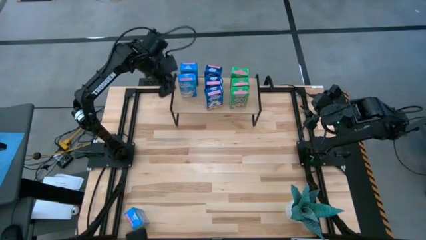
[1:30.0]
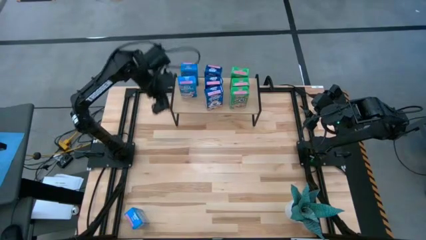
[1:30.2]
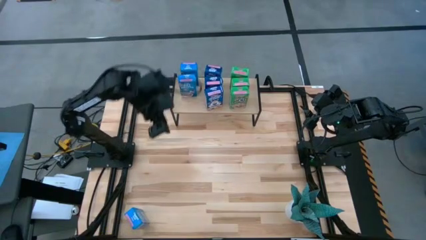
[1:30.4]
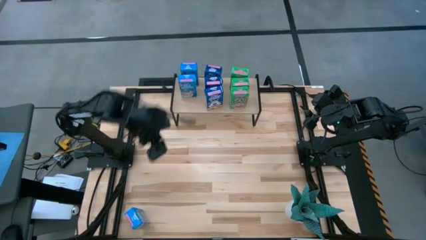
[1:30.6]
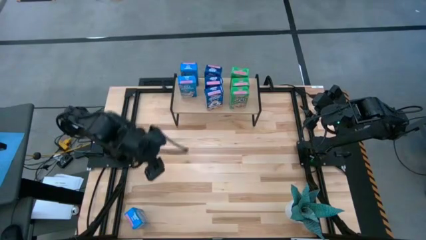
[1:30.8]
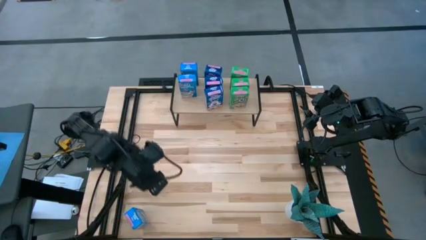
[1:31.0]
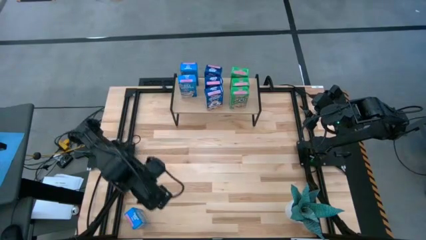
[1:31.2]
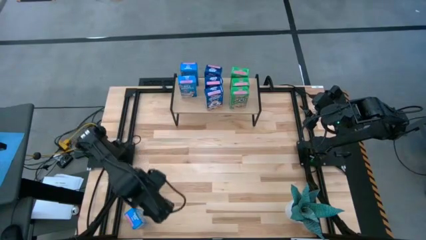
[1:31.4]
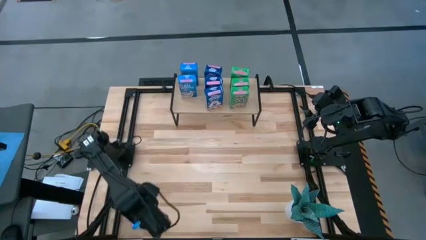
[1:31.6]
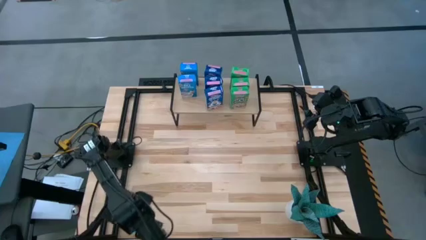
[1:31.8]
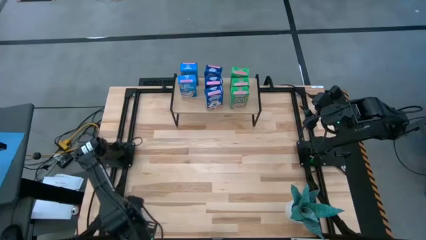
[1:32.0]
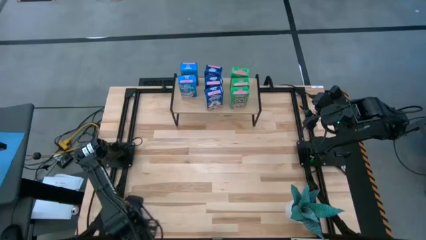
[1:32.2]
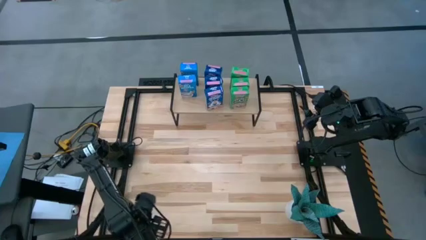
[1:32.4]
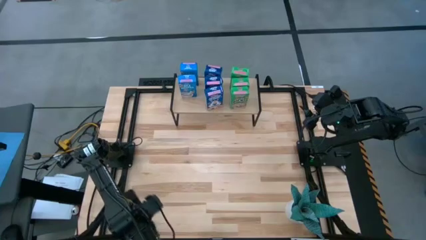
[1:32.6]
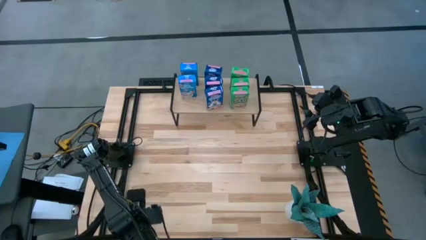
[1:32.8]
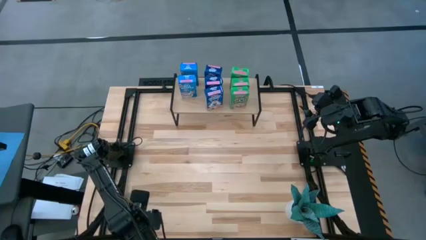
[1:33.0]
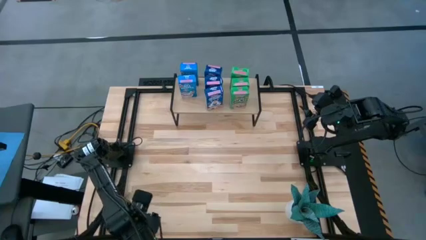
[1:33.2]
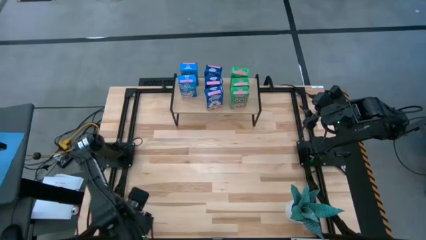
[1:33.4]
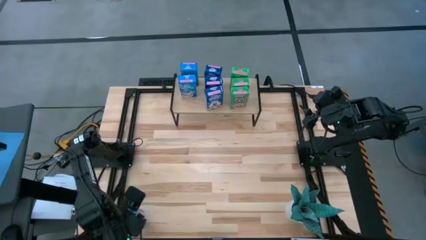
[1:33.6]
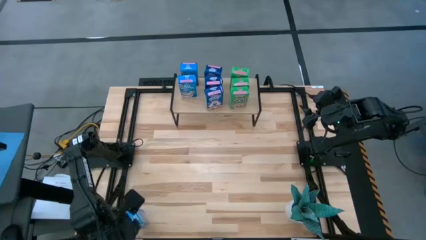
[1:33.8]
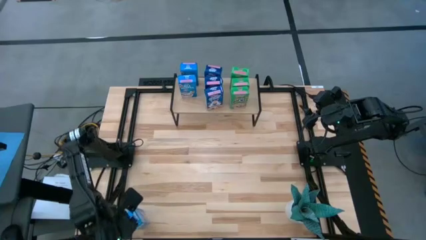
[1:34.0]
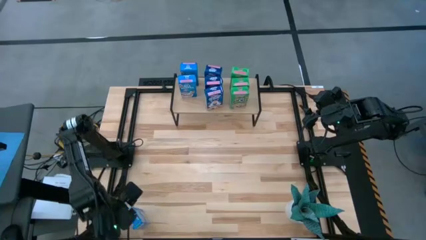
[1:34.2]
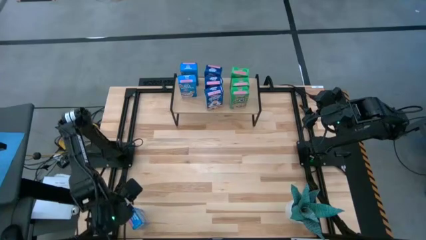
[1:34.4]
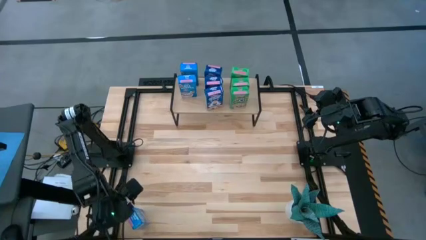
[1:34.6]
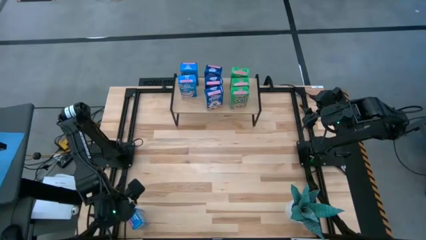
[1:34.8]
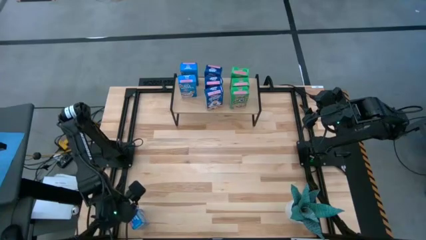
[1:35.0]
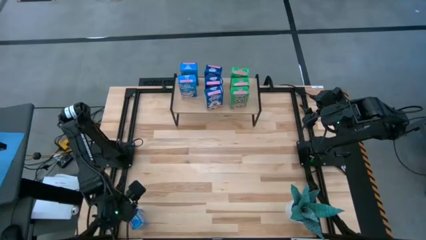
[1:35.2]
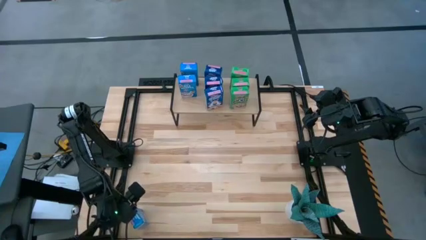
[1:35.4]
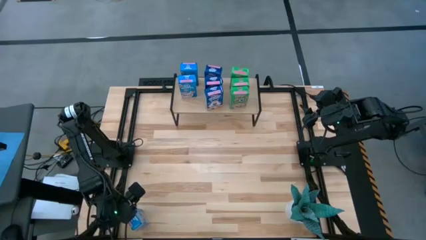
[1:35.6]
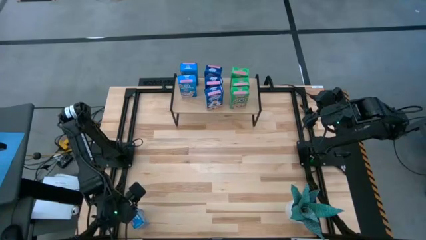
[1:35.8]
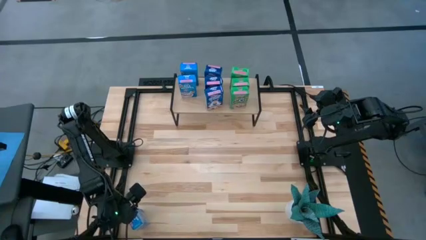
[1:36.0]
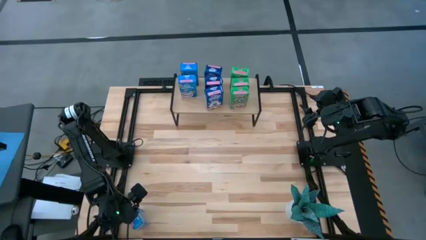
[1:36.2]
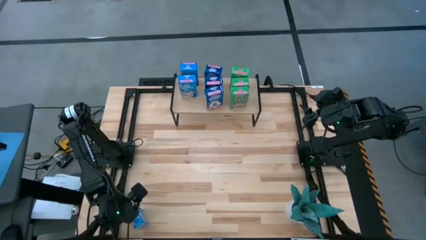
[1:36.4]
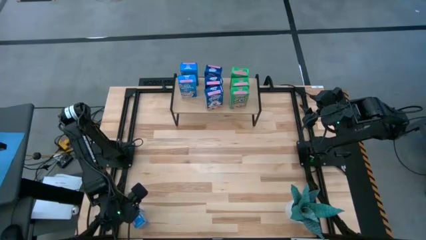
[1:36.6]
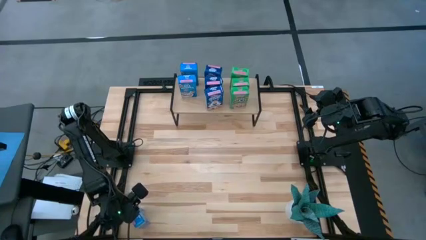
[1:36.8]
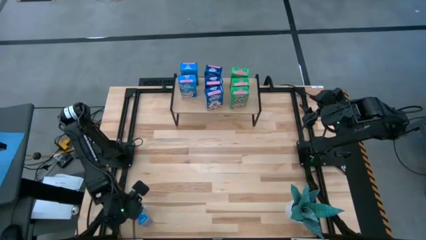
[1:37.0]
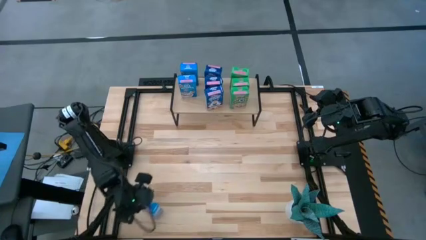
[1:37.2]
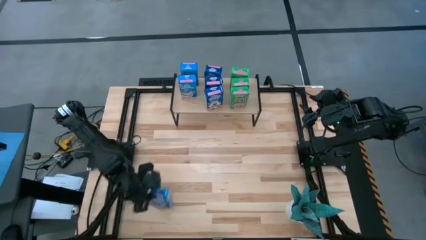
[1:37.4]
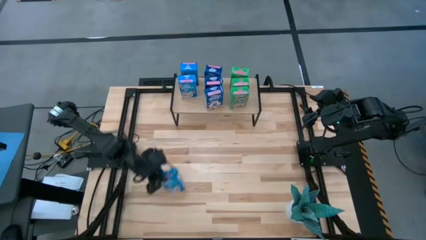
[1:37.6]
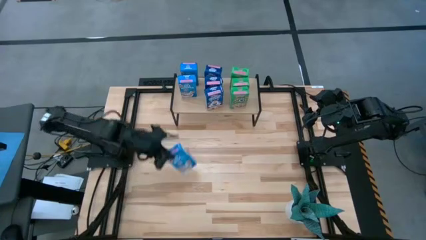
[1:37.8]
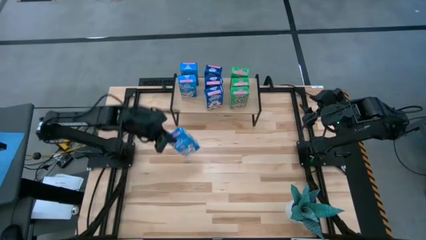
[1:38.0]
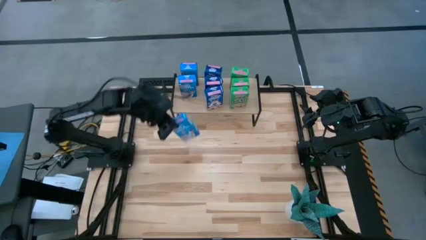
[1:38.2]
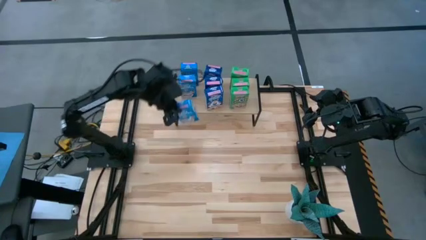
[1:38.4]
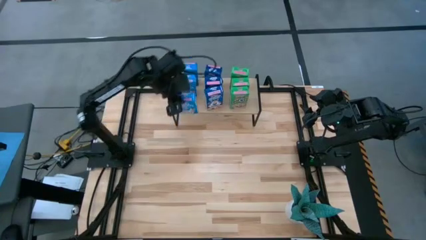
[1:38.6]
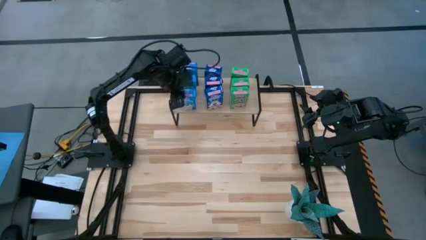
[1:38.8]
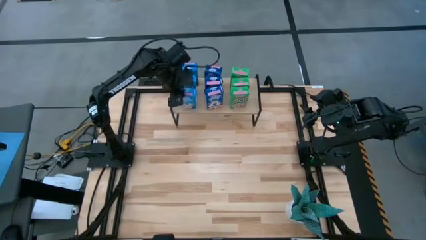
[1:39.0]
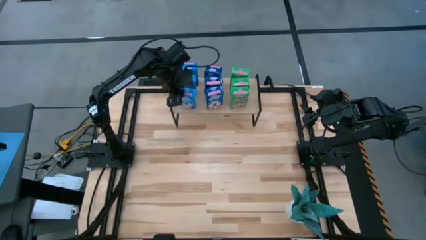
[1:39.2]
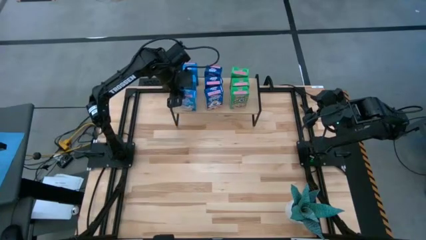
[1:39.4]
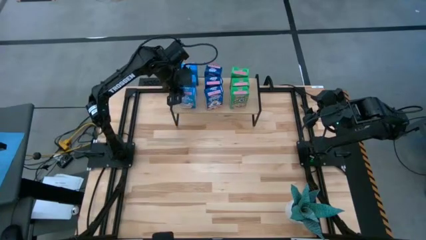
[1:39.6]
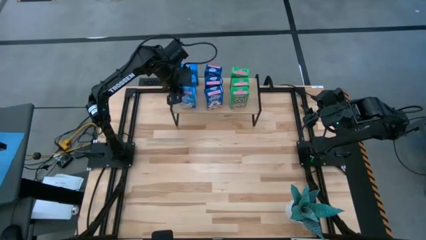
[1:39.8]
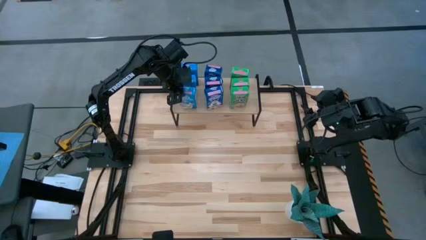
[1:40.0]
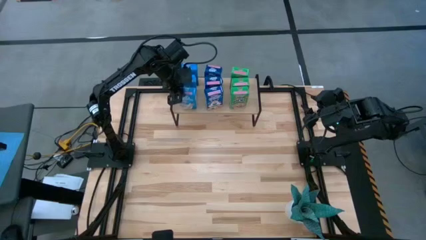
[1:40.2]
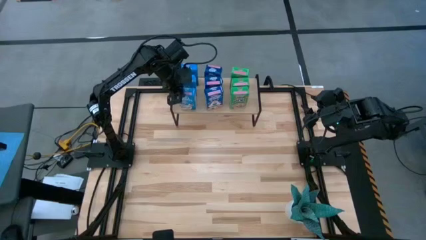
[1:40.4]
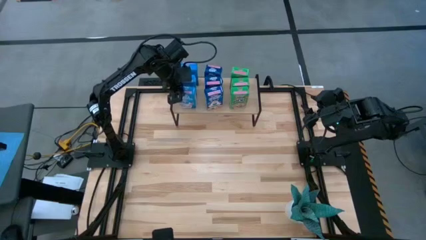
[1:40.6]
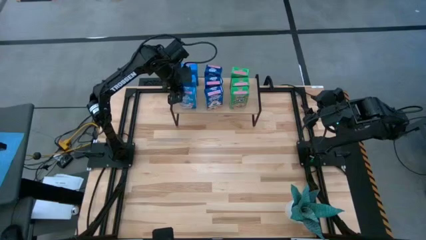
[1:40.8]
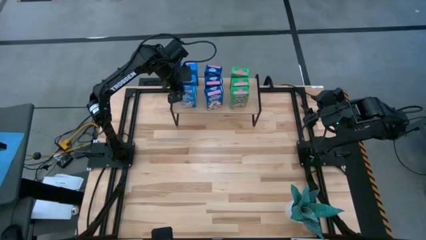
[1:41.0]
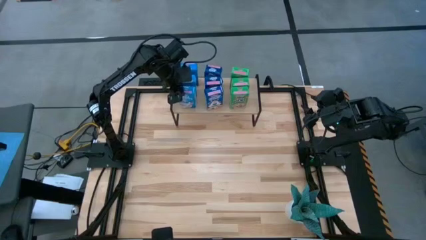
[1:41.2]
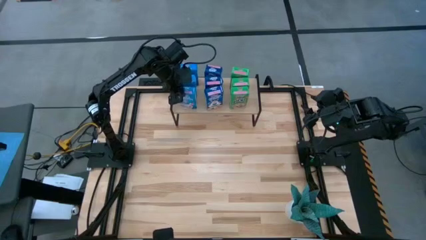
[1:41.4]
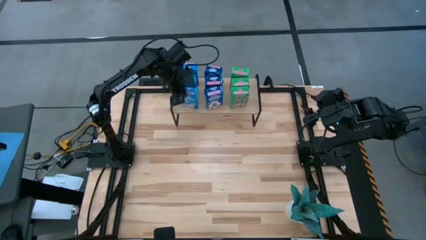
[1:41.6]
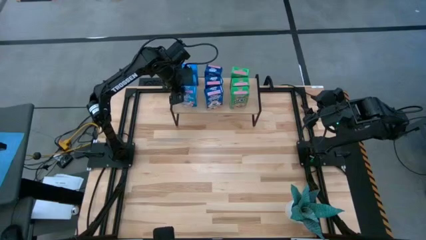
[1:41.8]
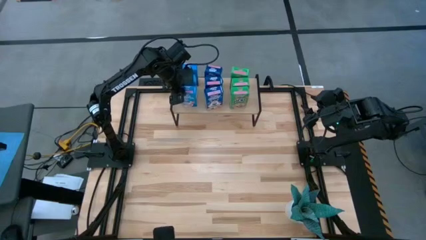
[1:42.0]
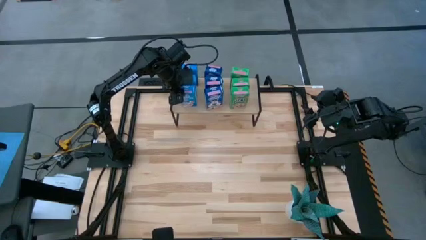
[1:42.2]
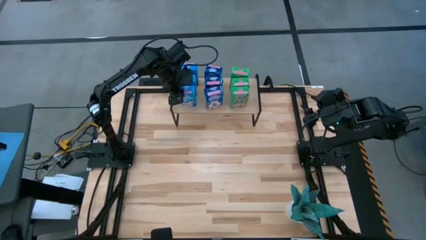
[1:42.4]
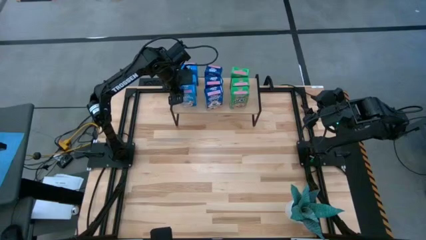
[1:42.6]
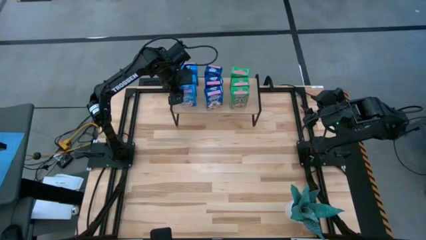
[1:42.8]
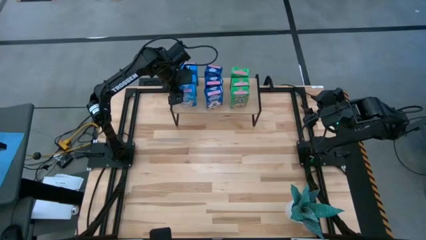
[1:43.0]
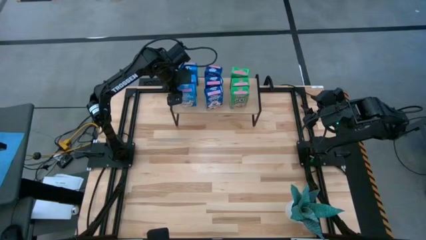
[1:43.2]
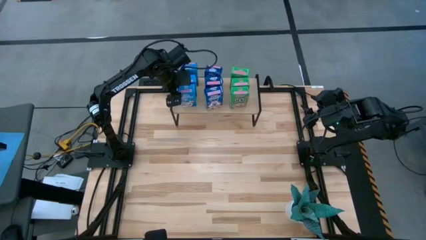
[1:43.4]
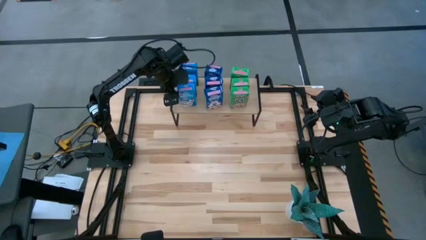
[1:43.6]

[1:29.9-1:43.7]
Task: Stack cereal on shelf
Put the light blue cereal box aligned with the other light blue cereal boxes on the shelf
